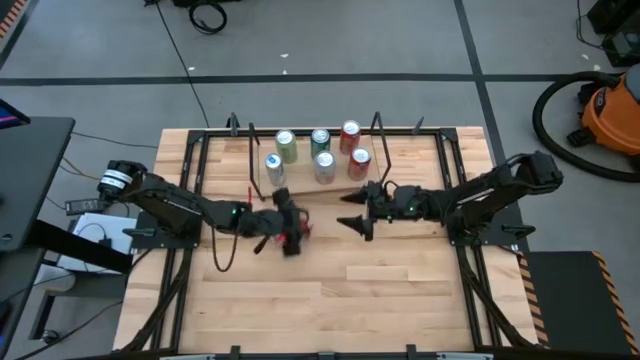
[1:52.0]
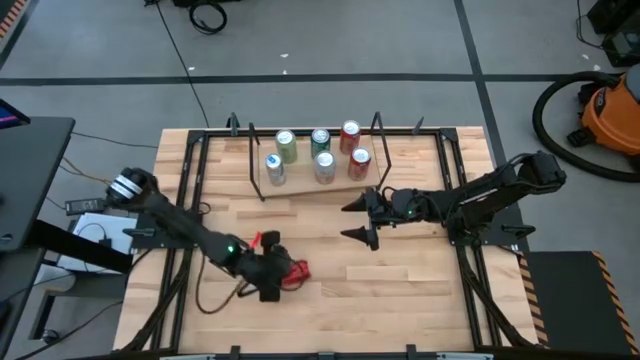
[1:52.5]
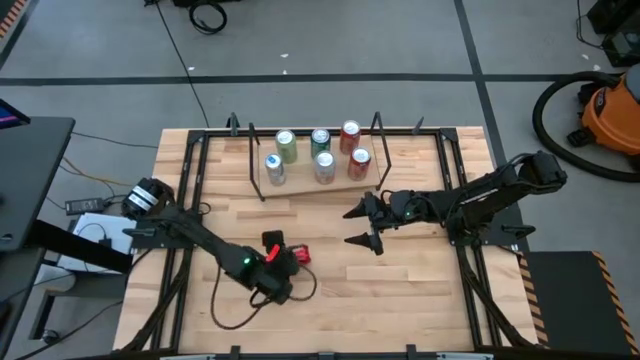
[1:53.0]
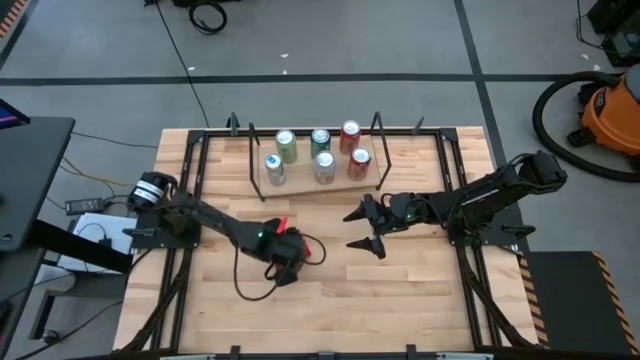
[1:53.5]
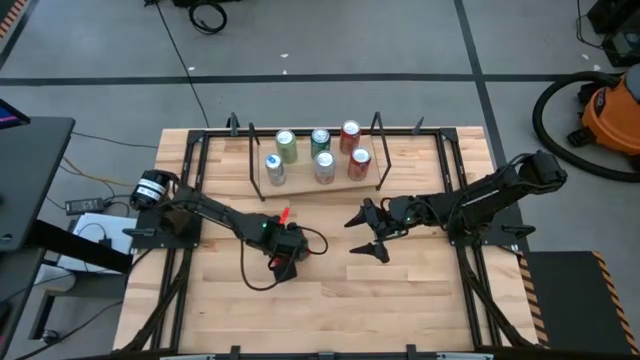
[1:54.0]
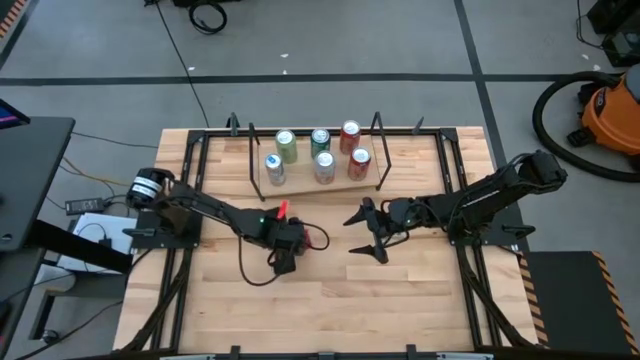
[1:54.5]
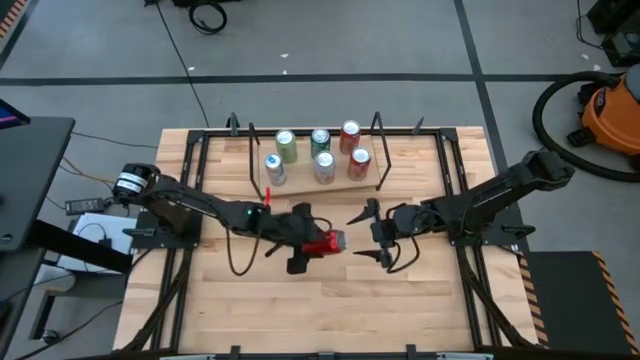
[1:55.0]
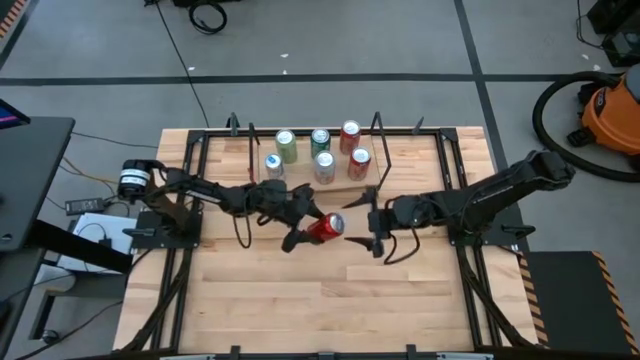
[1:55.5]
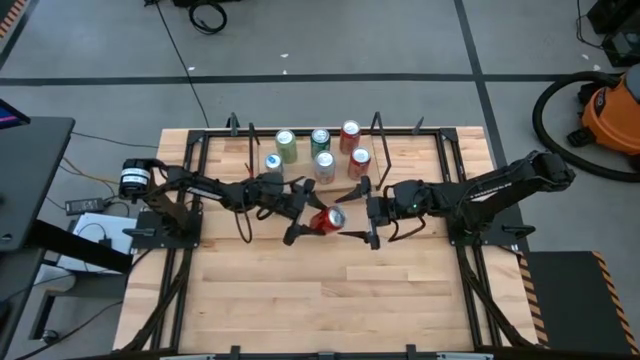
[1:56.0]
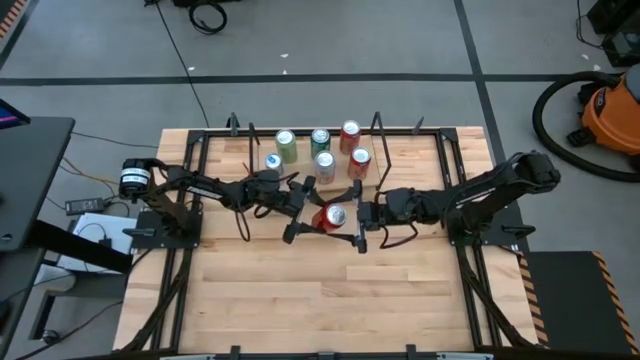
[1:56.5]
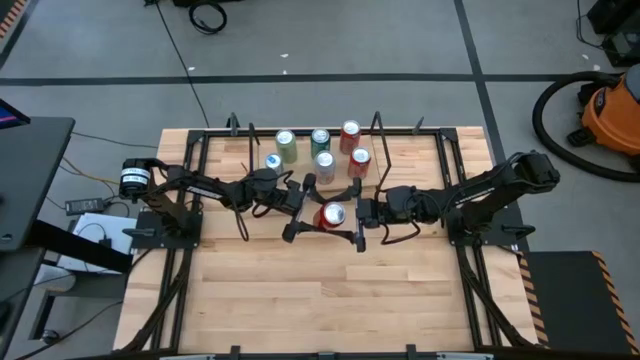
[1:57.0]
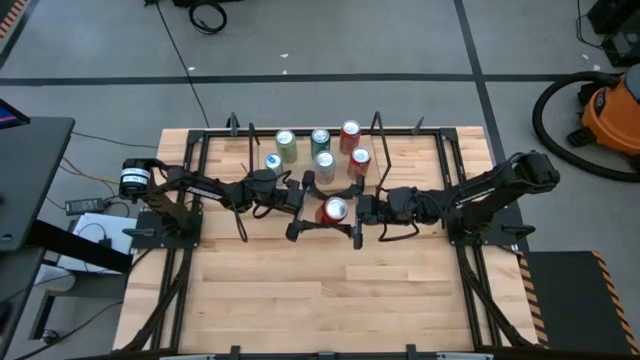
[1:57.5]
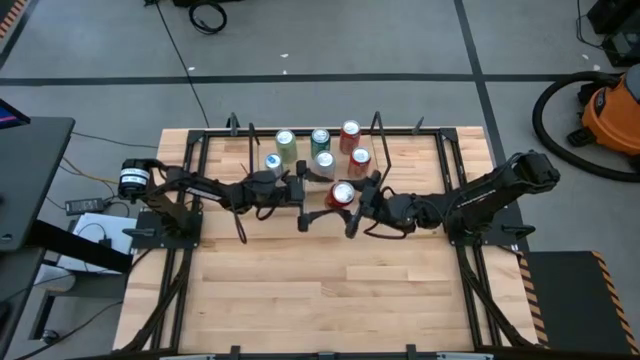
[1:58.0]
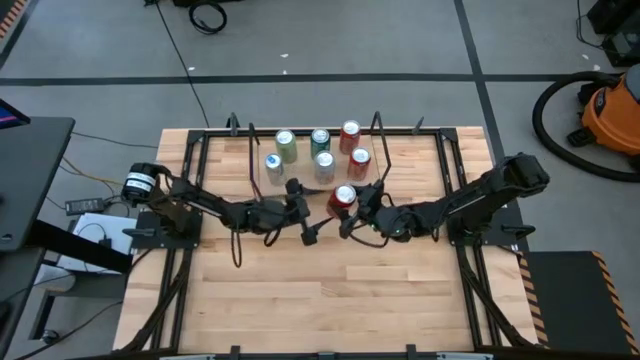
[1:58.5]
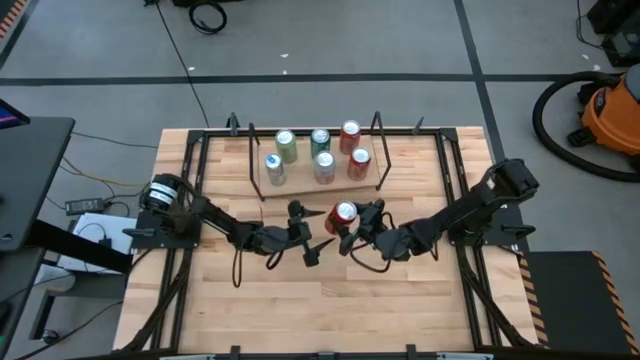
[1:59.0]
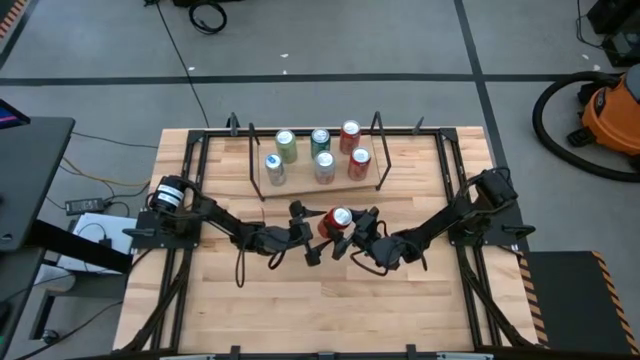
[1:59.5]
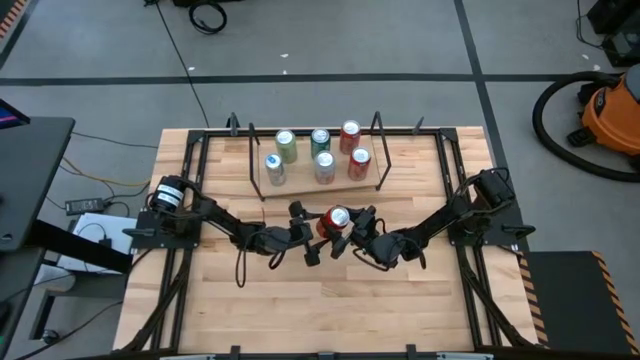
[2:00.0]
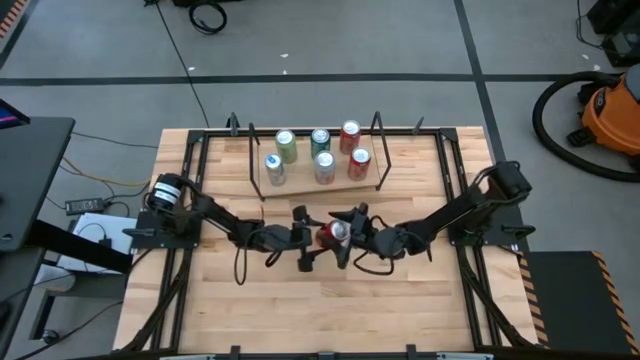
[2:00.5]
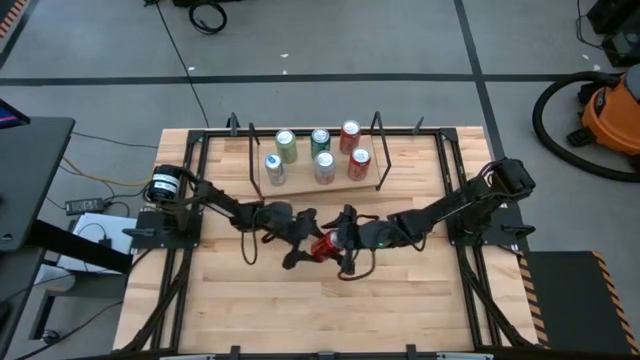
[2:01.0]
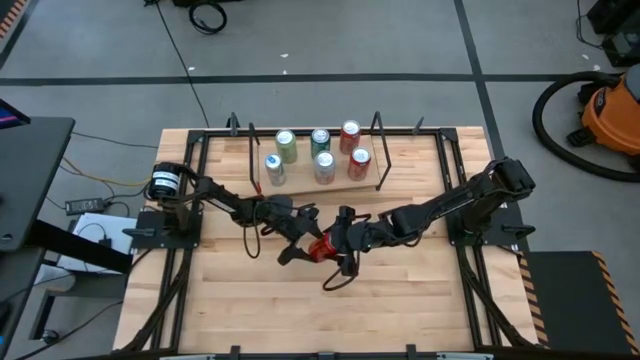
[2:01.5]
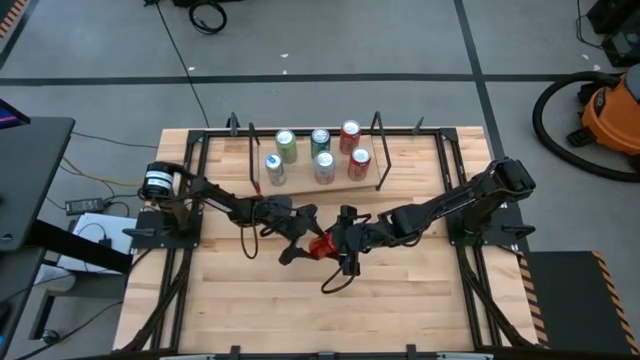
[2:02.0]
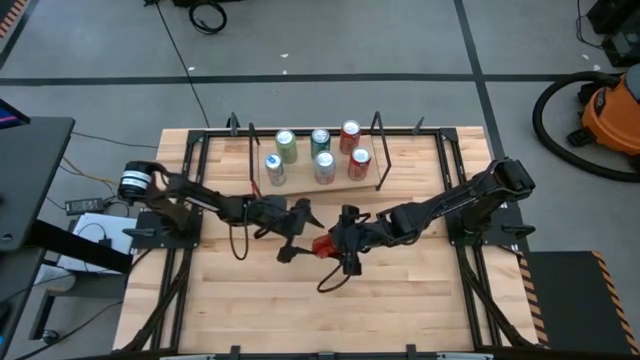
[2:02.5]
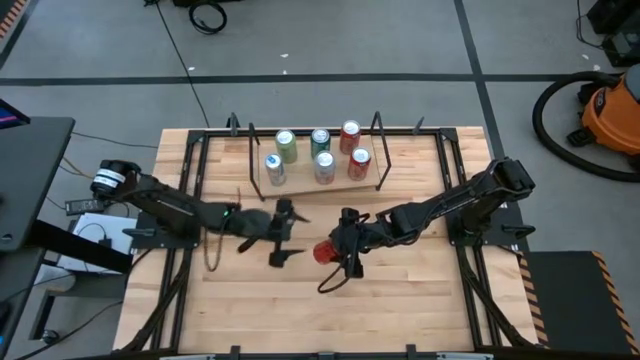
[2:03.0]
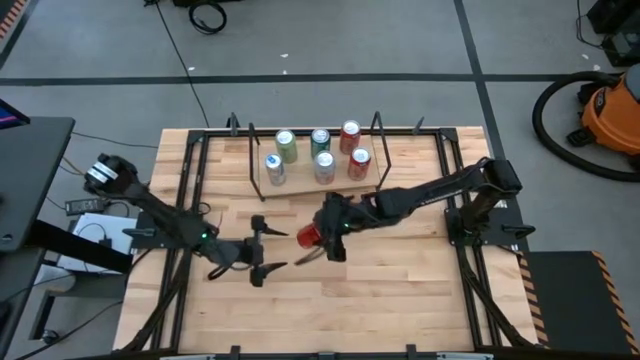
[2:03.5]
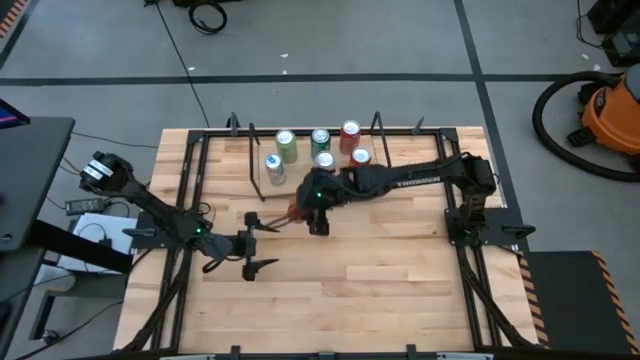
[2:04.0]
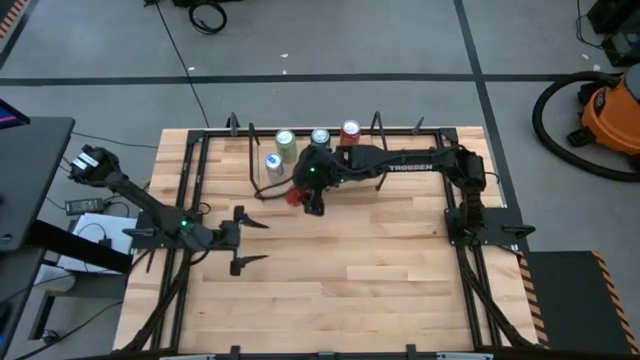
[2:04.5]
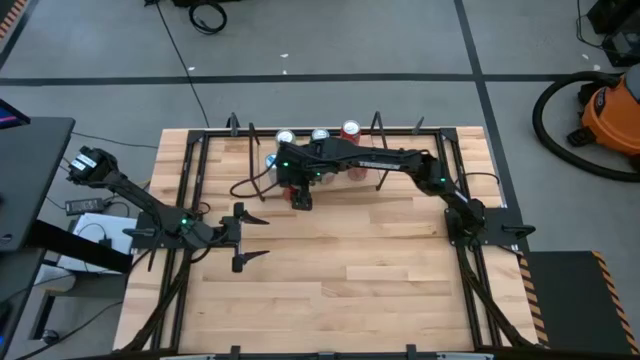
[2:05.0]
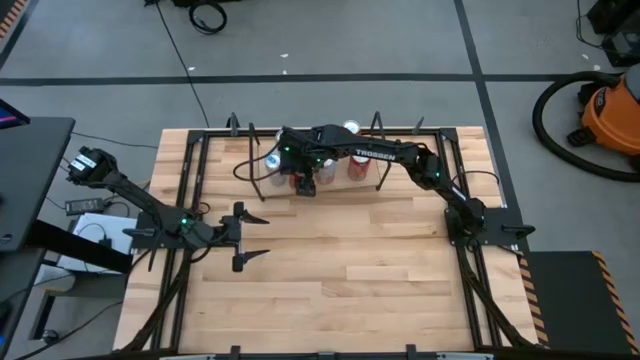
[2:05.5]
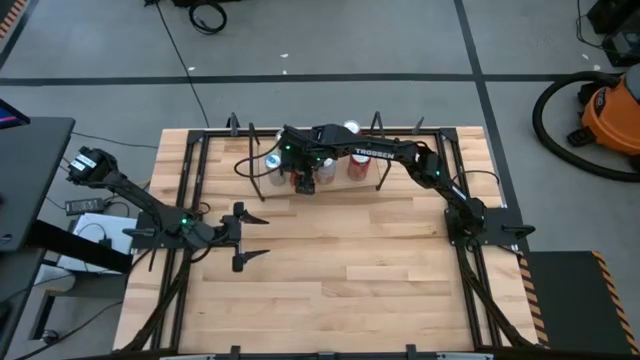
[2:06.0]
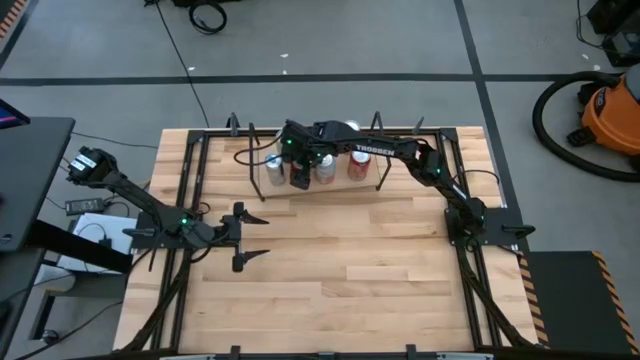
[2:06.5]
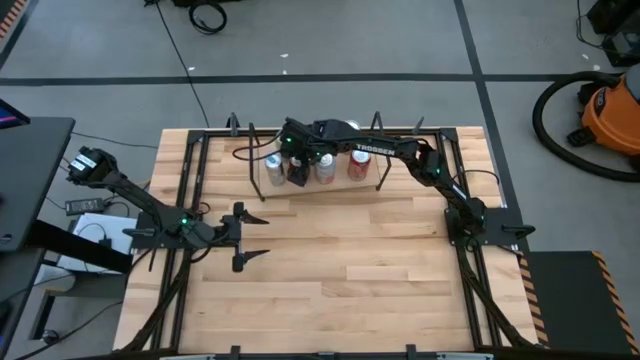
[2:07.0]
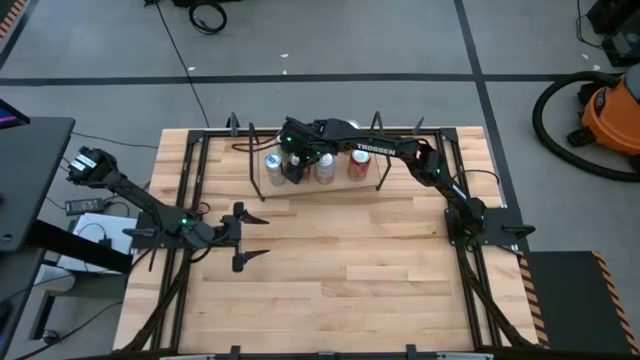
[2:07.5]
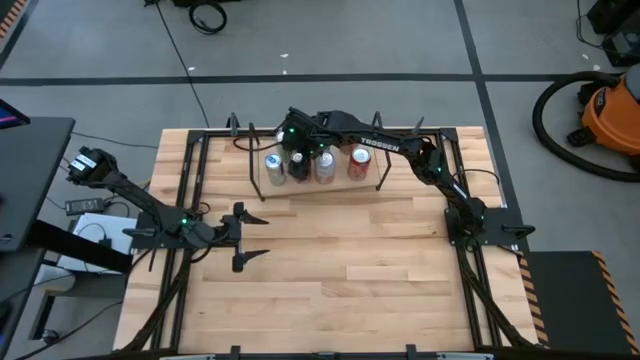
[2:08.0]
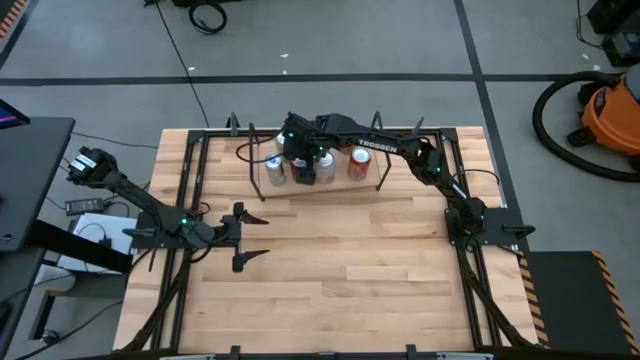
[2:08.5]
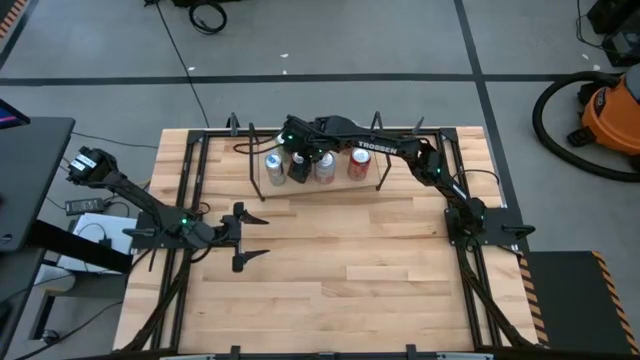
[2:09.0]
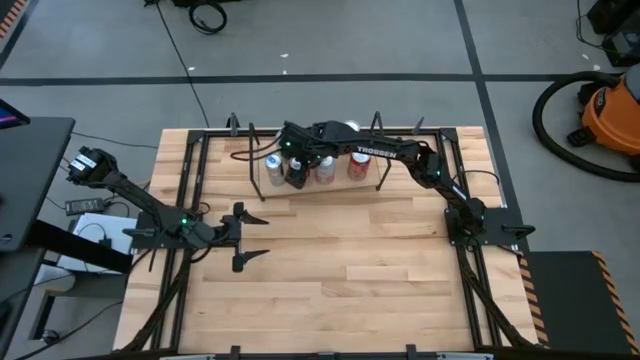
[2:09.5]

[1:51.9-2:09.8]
Task: Place canned beverage on shelf
Put the red-black soda can on the shelf

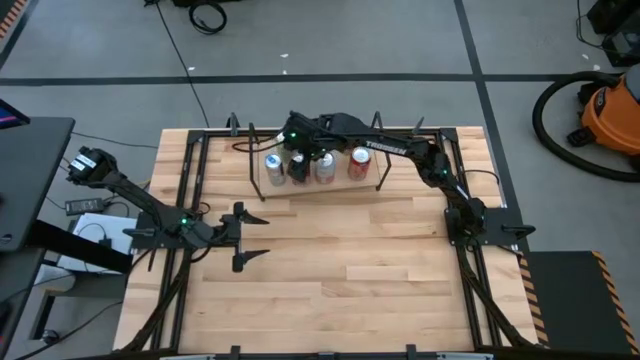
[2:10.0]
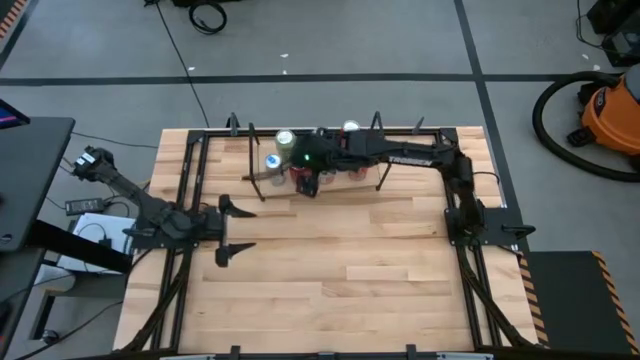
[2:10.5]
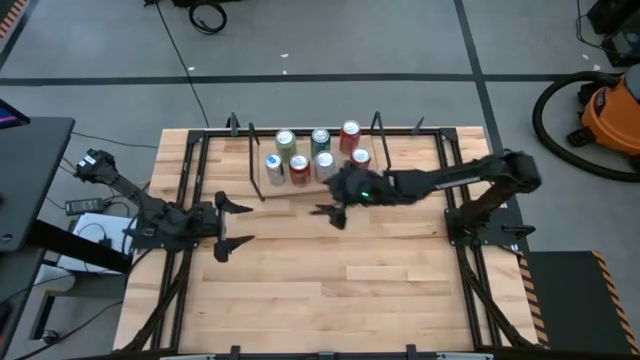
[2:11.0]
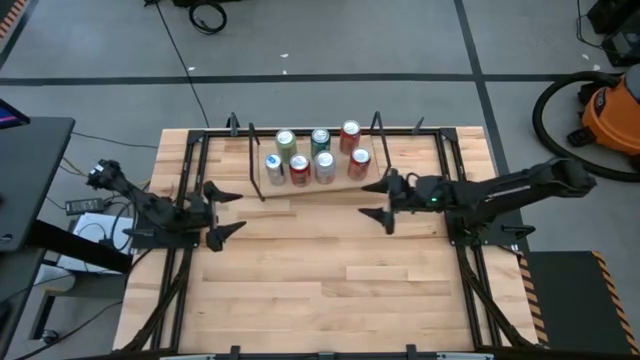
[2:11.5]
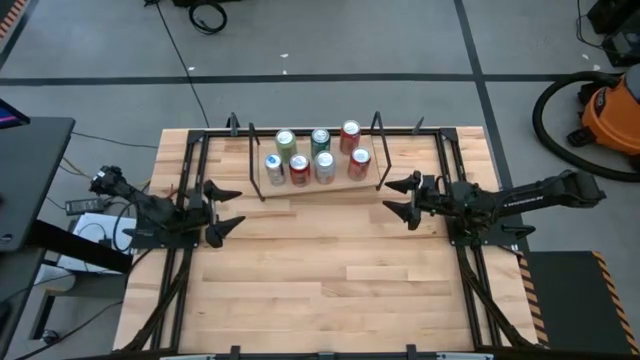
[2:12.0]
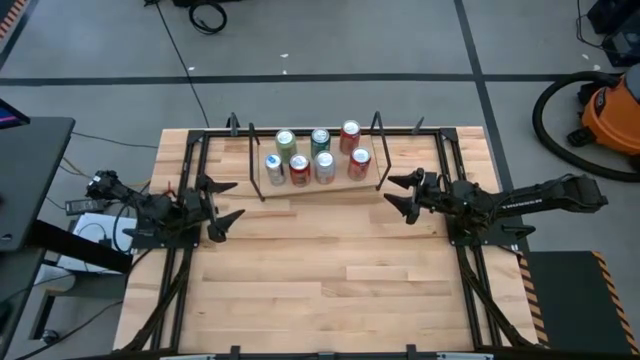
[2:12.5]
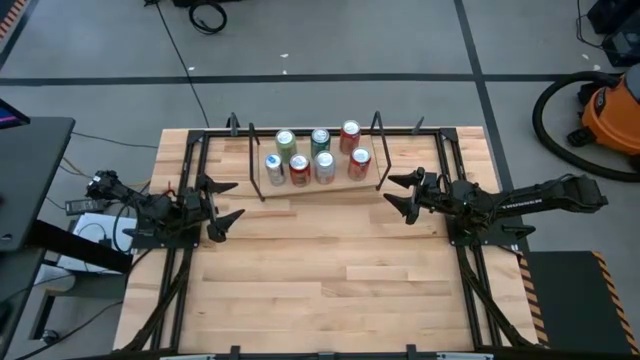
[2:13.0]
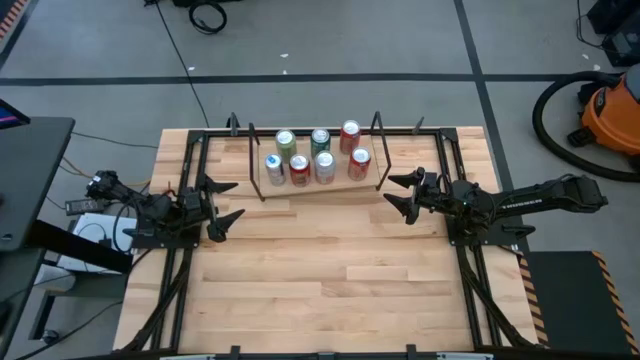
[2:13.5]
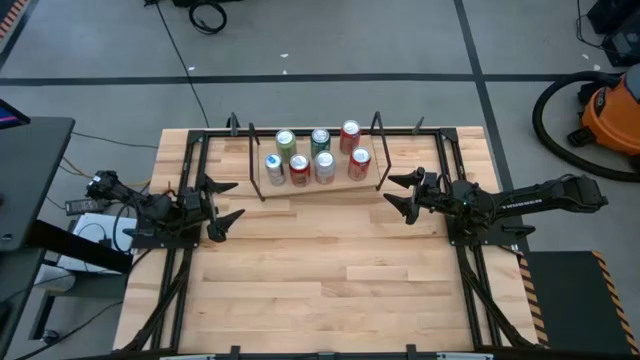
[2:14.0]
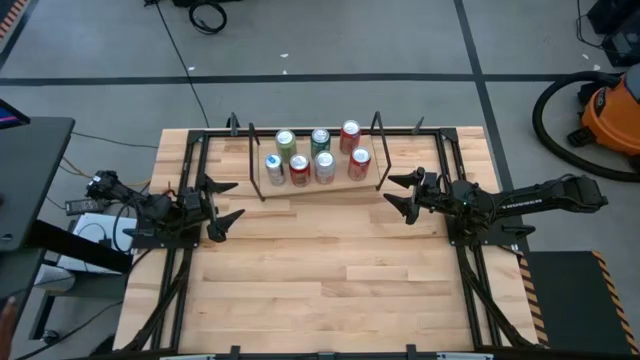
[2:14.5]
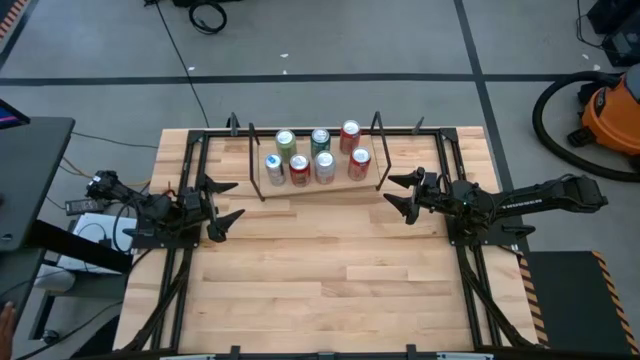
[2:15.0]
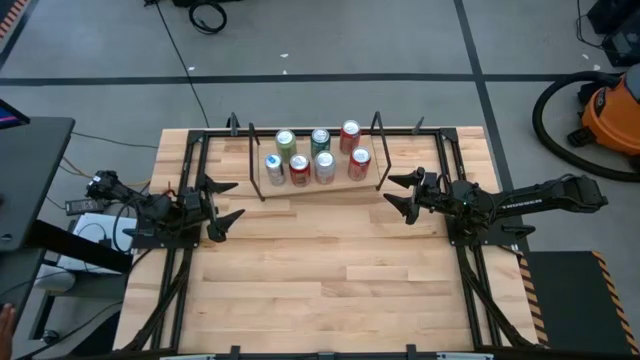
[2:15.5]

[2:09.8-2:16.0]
Return to Home Position
